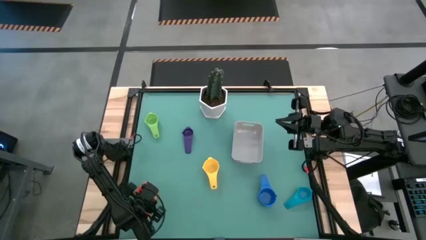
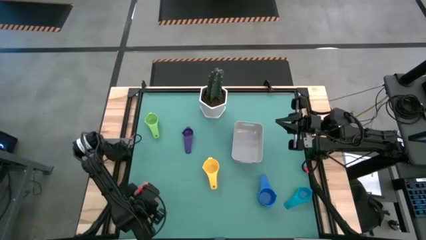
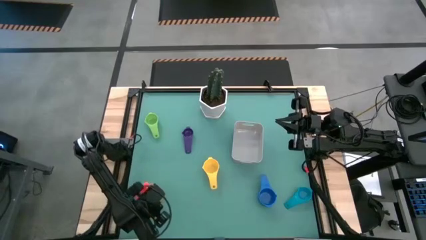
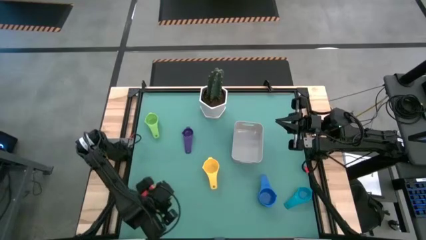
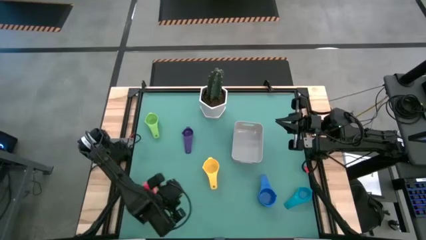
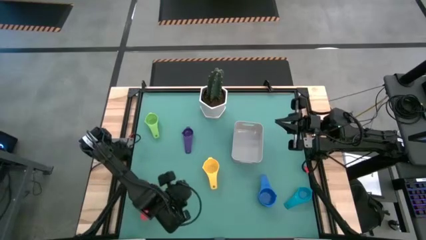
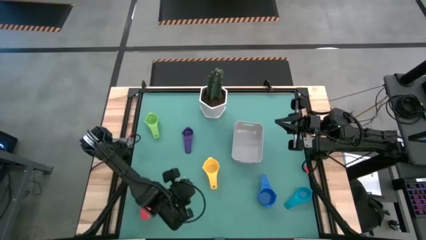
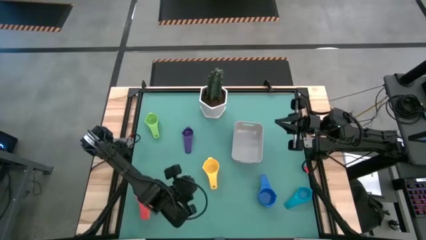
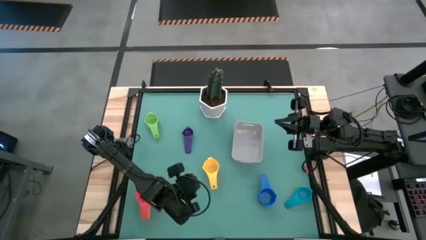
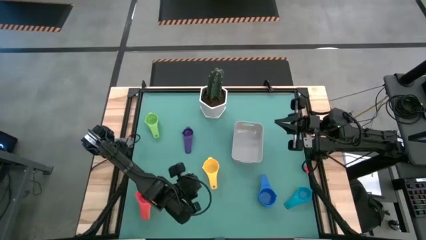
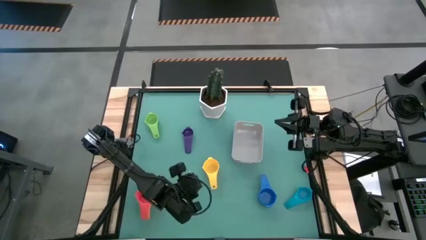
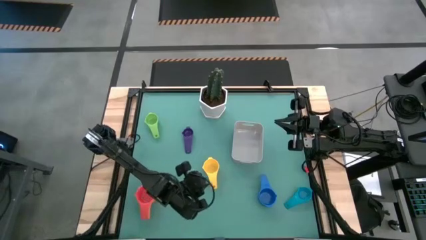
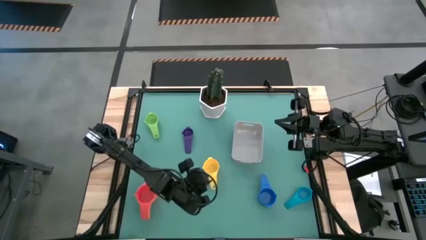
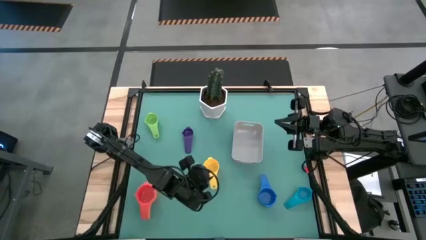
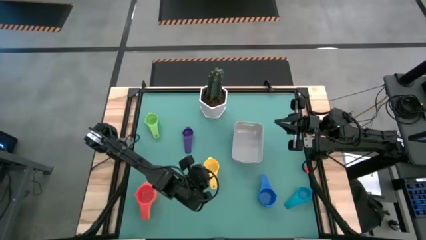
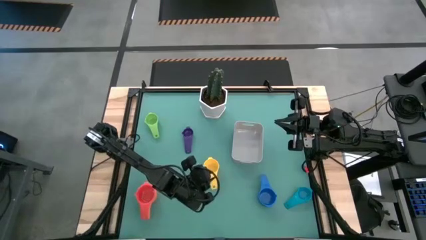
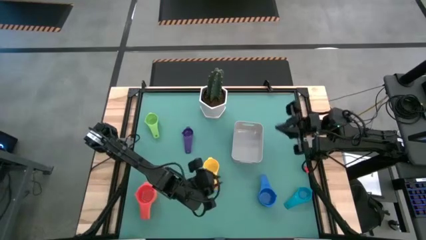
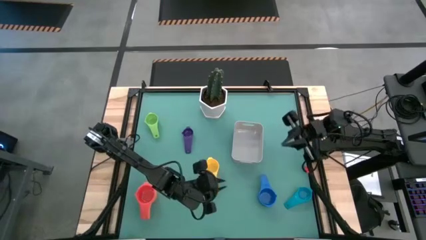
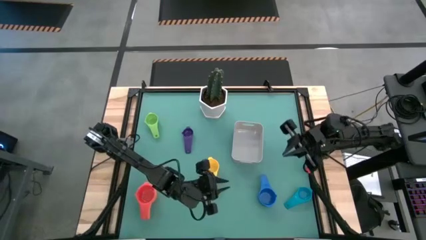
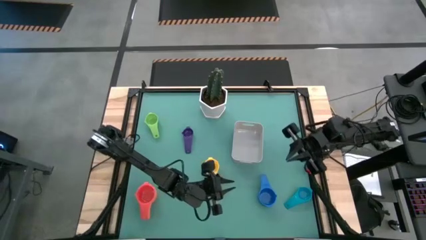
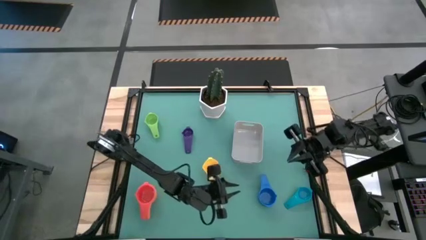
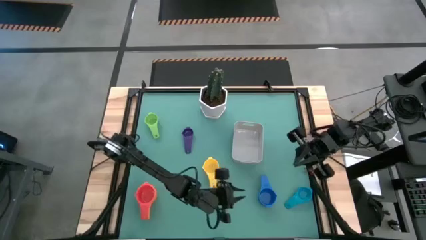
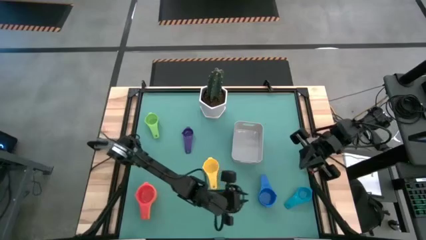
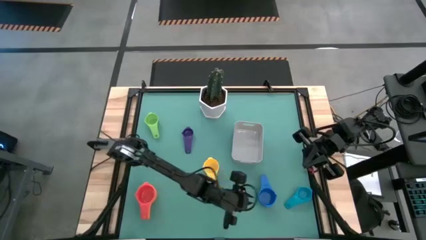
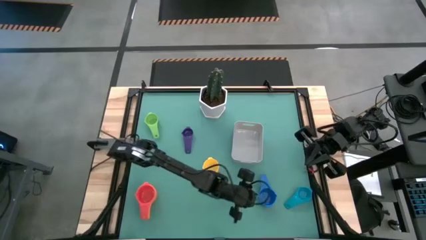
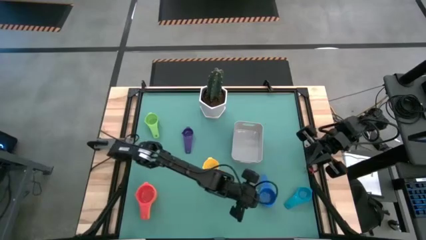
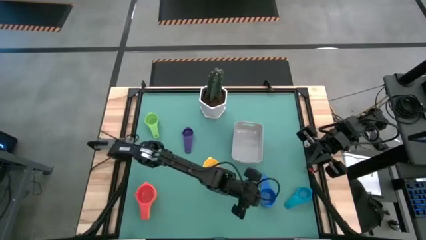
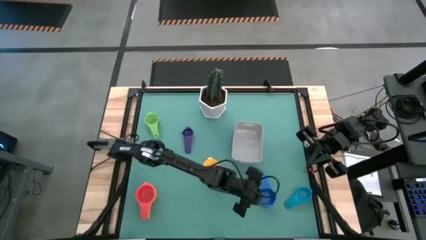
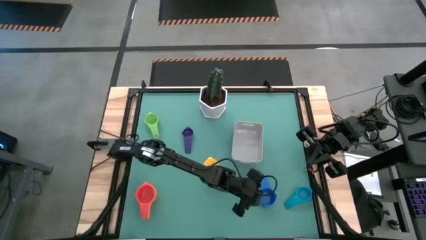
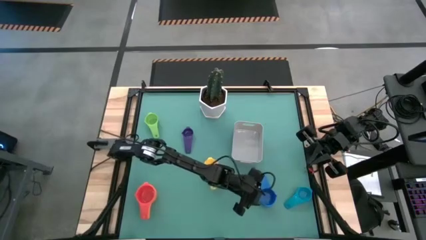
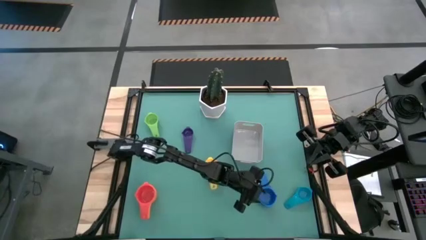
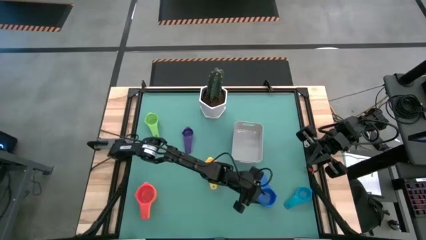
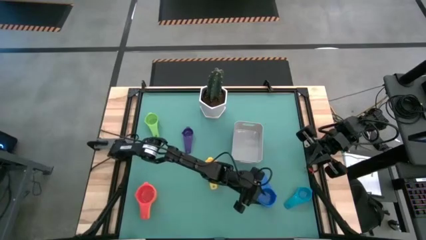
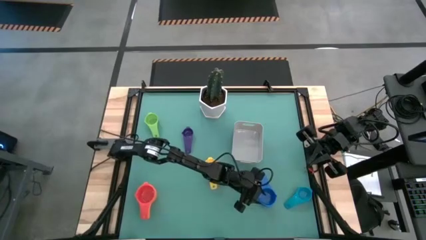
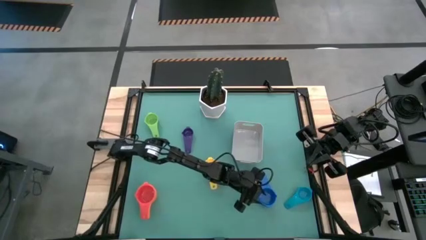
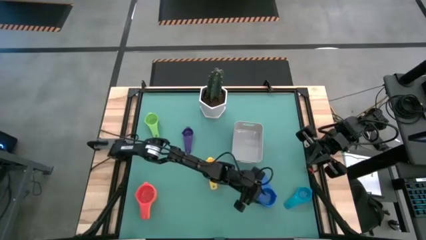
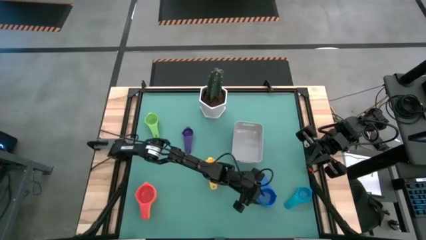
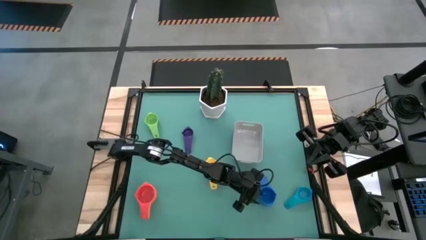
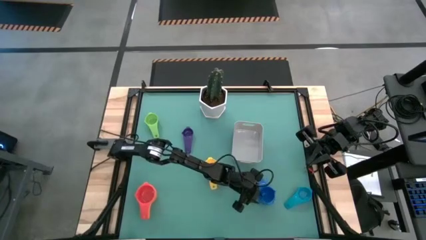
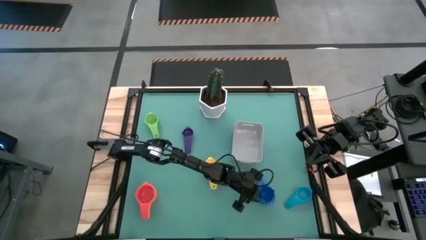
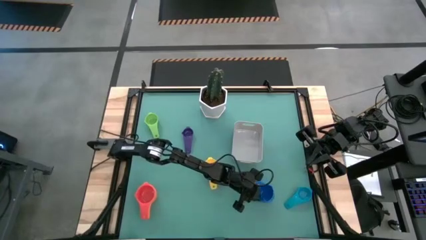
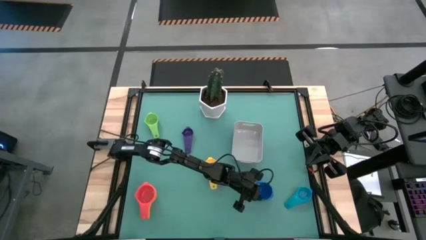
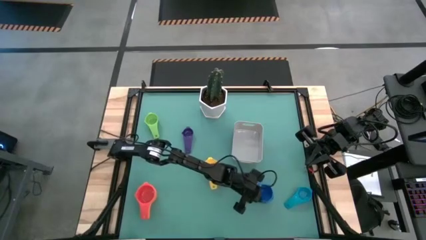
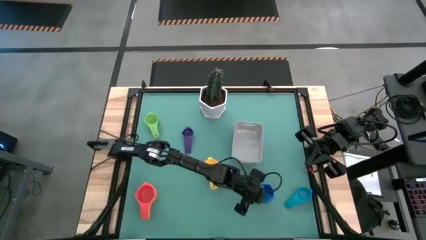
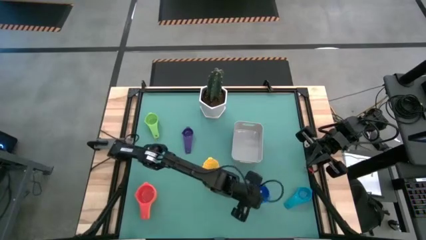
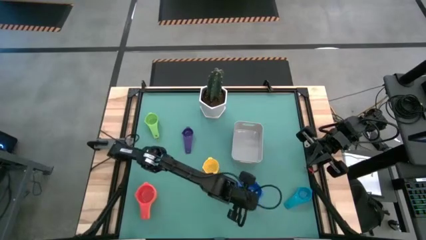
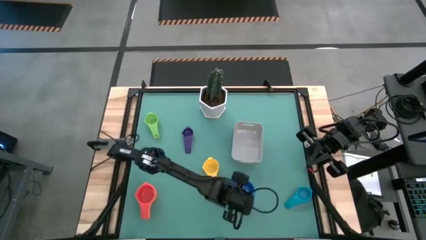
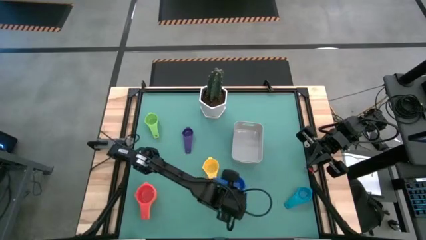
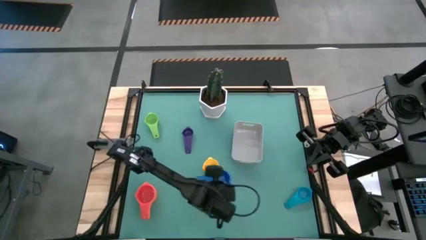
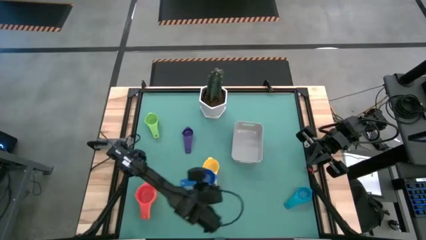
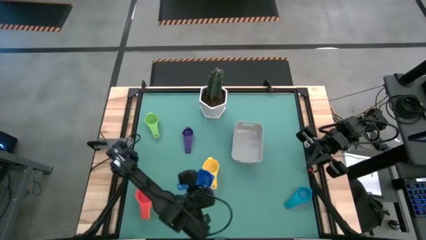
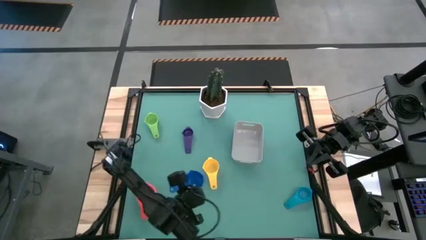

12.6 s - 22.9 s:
Task: Nest measuring cups in basket
Stack the blue measuring cup on the top of the red measuring cup

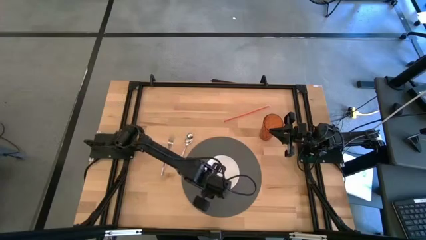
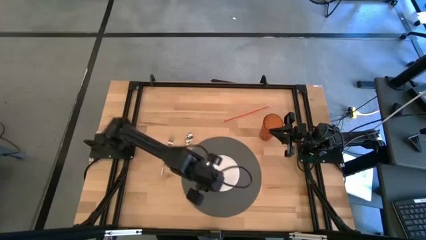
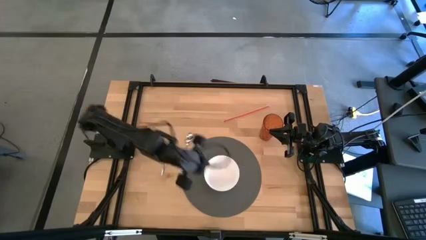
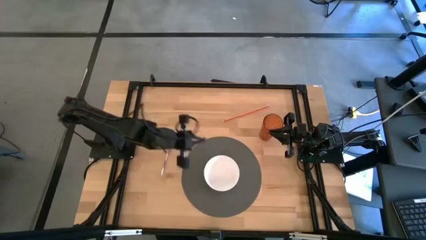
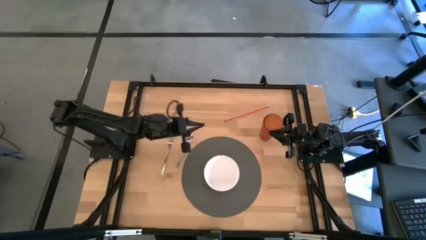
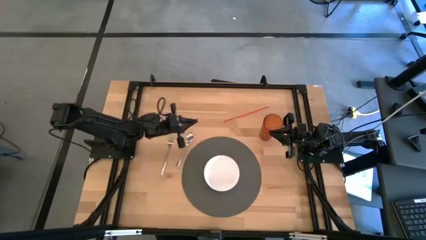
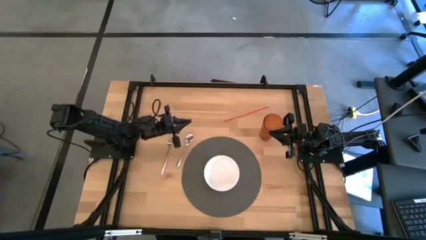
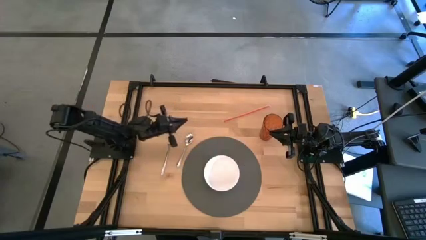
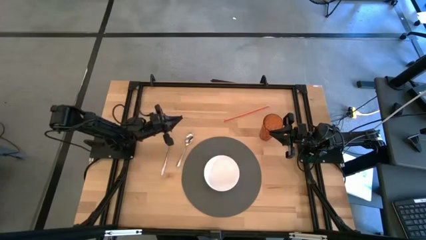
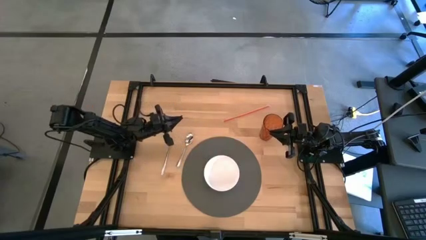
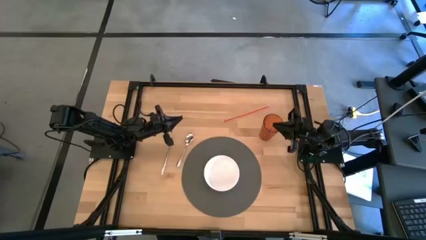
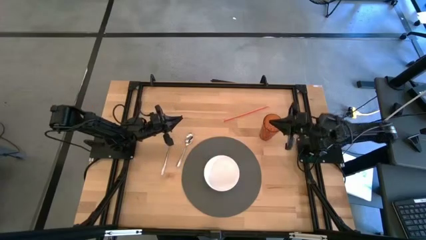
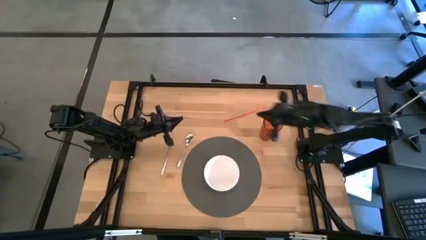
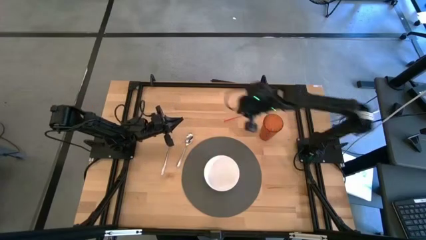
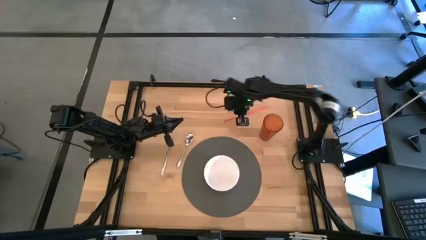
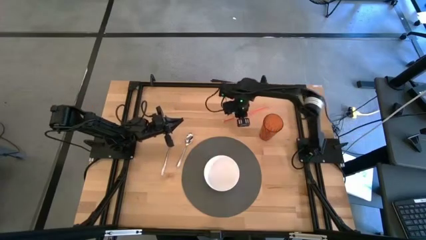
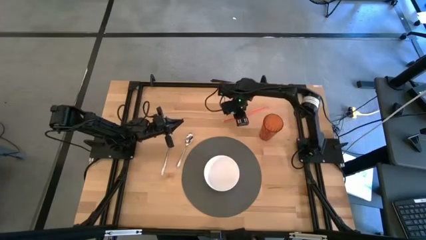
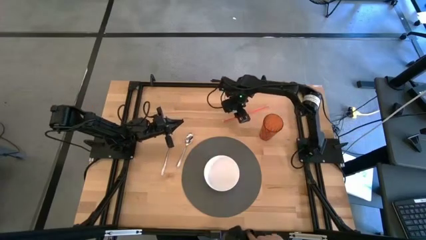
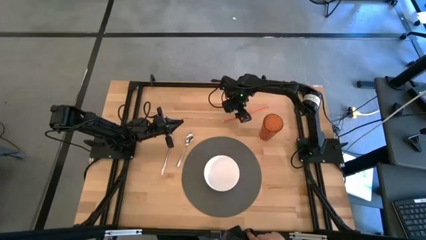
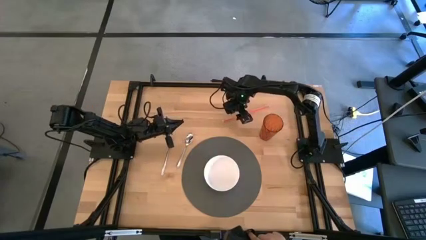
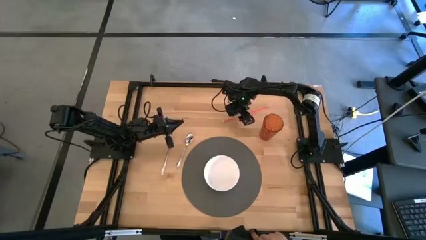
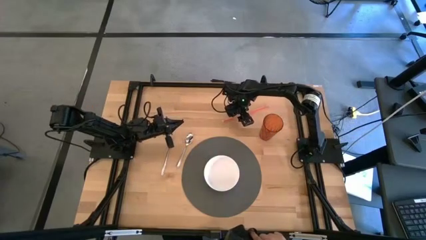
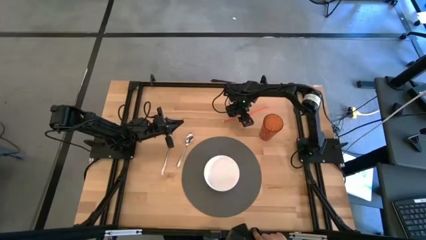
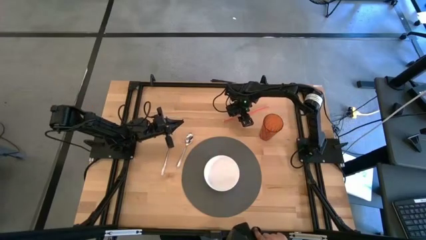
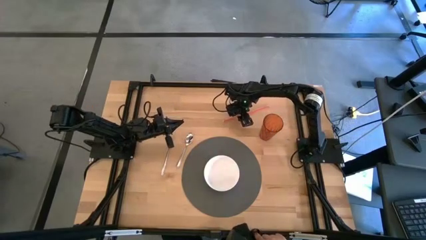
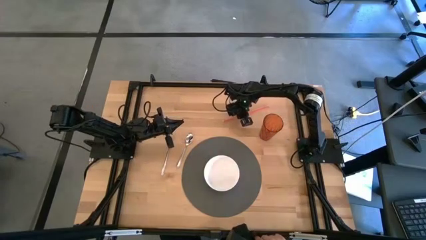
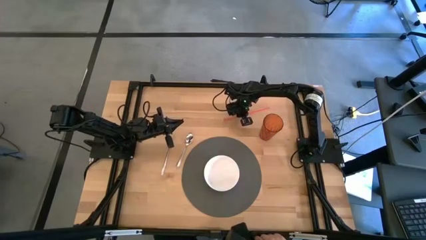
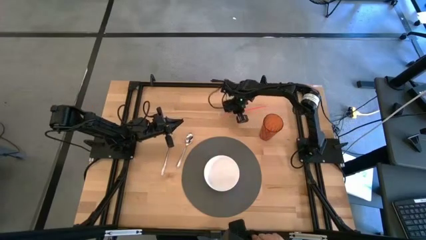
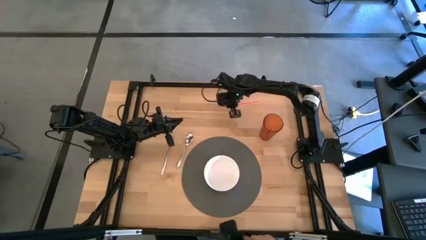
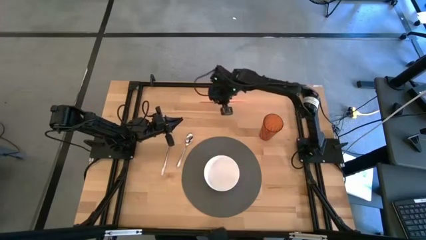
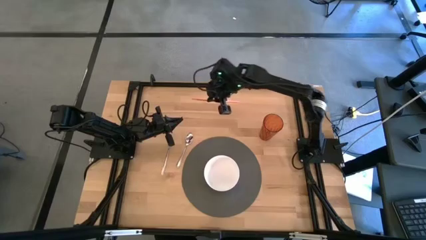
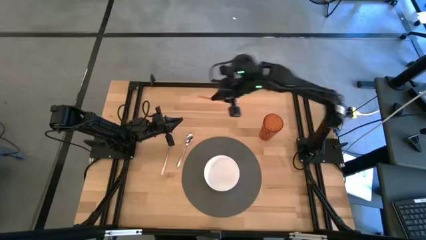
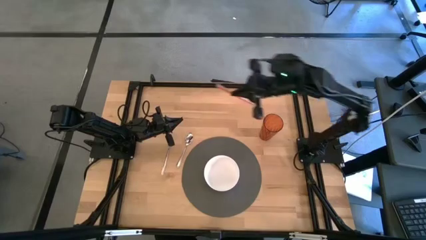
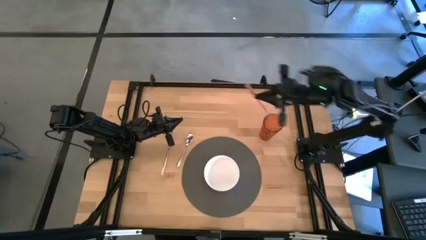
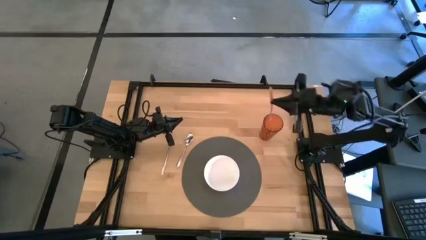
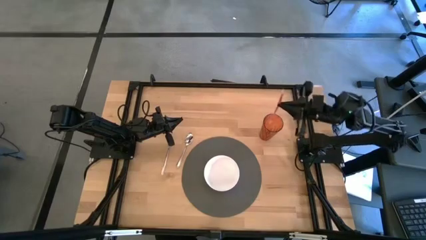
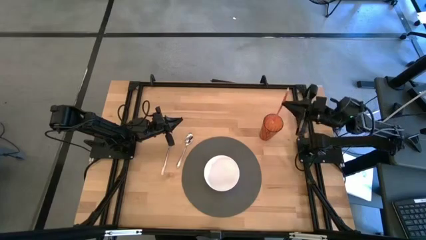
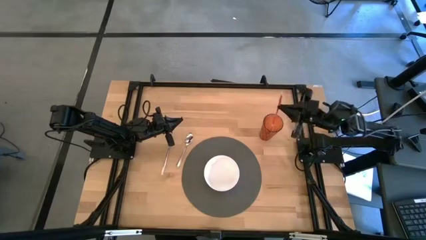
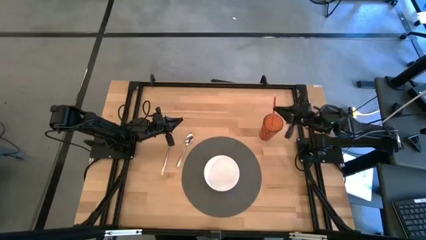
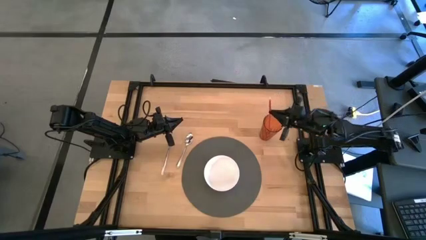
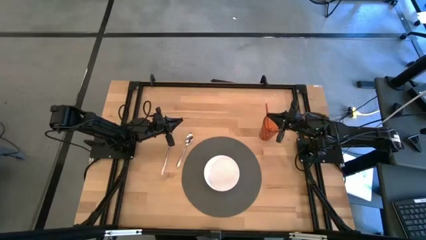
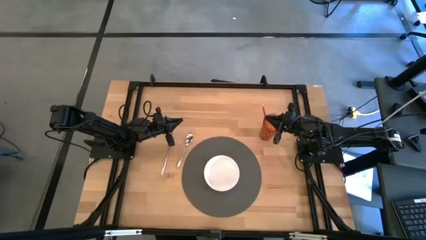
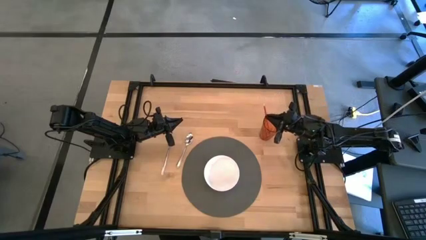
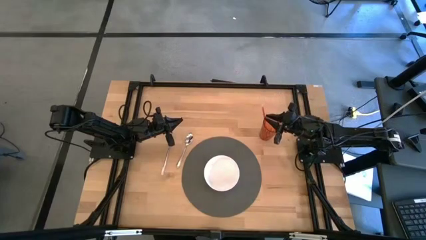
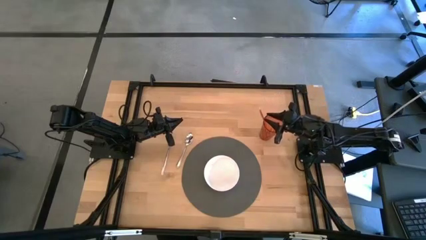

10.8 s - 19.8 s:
Task: Pick & Place Utensil
Put the orange straw into the brown cup
